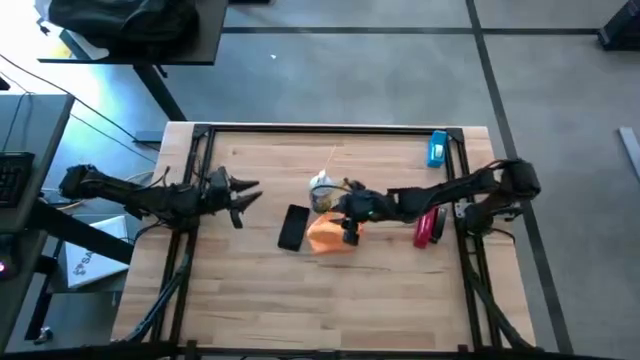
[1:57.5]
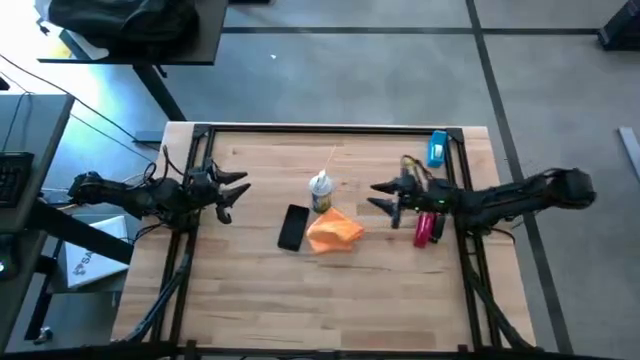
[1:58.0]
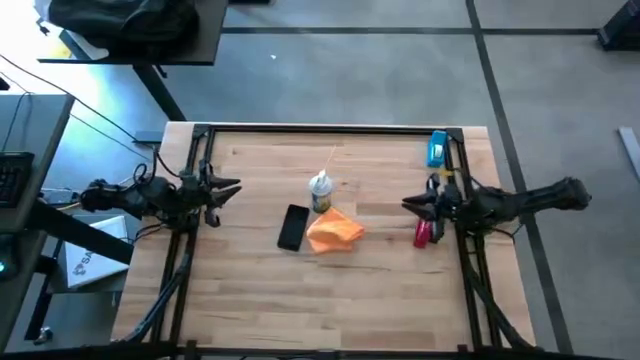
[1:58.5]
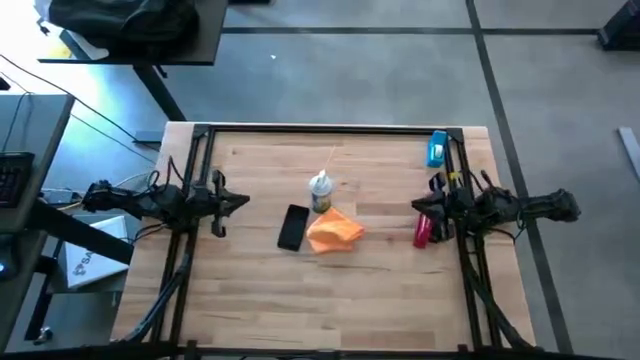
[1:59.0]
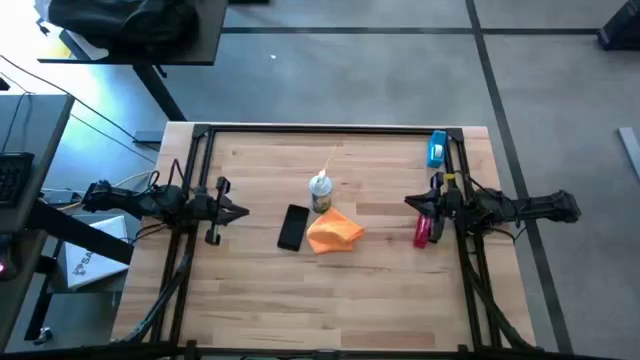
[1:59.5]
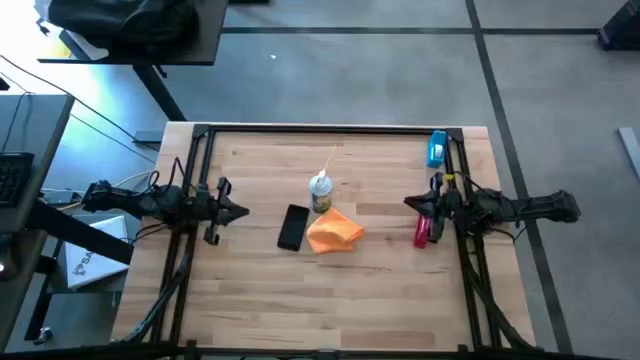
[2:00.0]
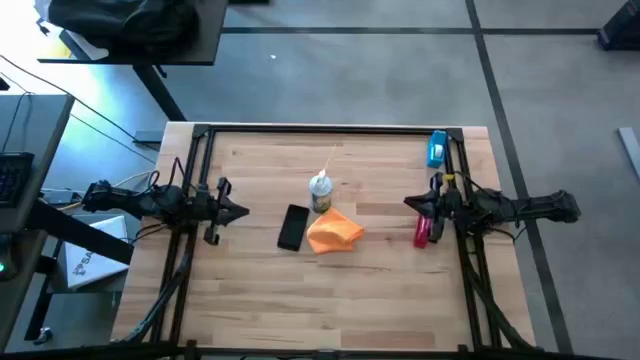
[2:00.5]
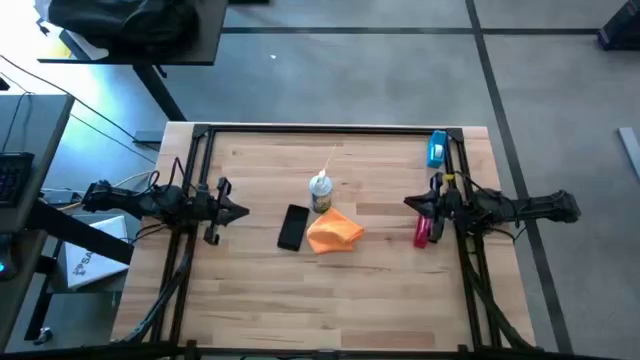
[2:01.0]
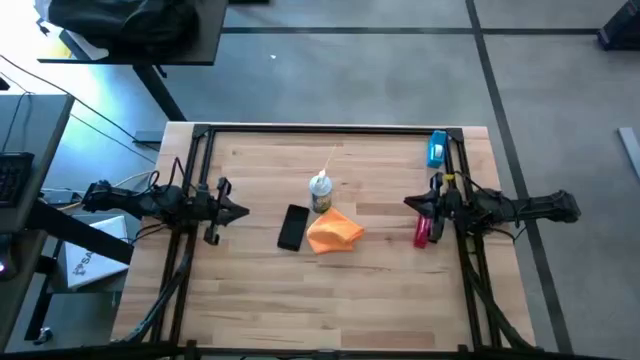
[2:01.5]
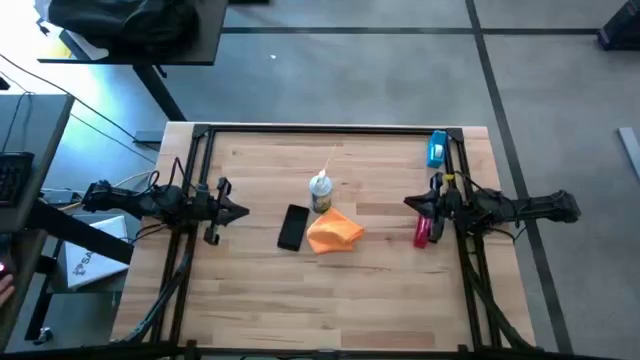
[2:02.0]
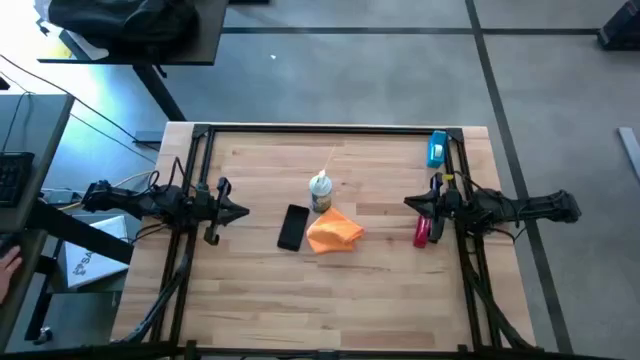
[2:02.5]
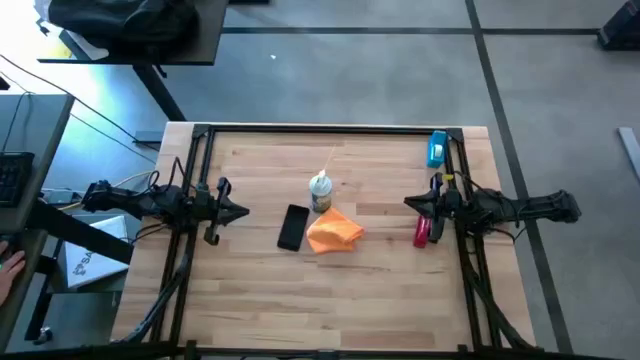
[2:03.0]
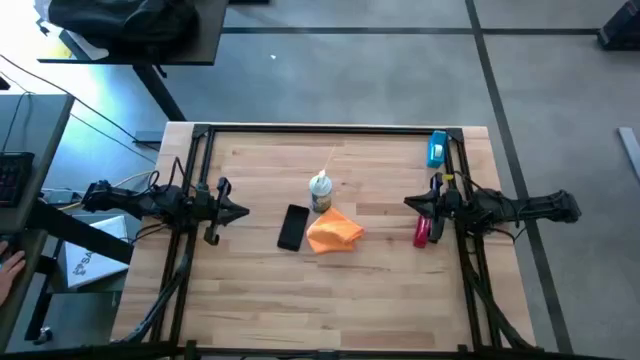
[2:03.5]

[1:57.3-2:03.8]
Task: Apply microfiber cloth
Return to Home Position

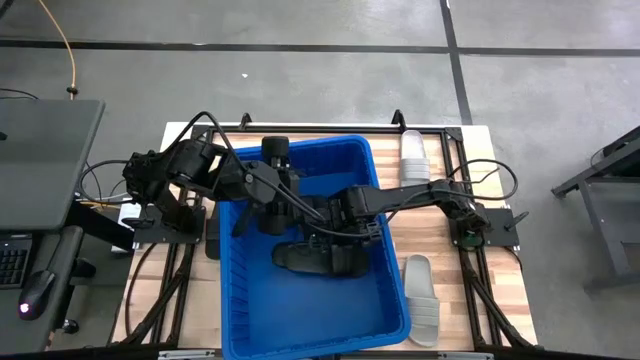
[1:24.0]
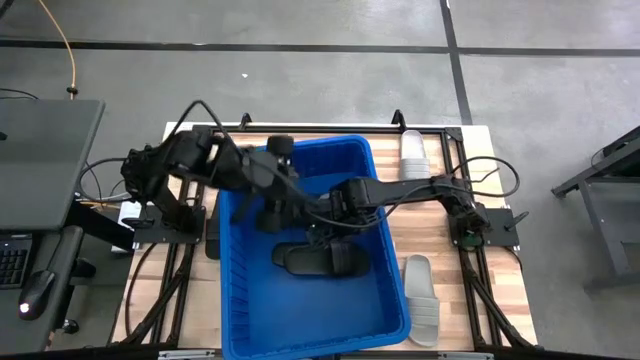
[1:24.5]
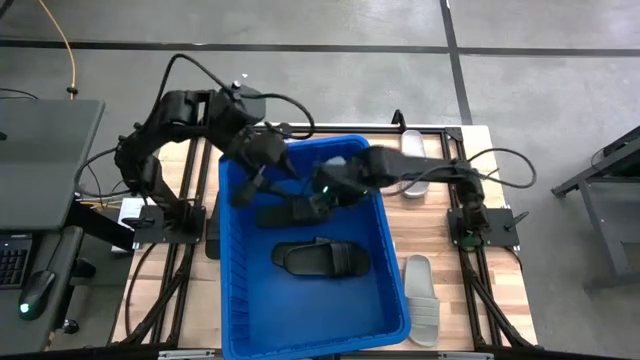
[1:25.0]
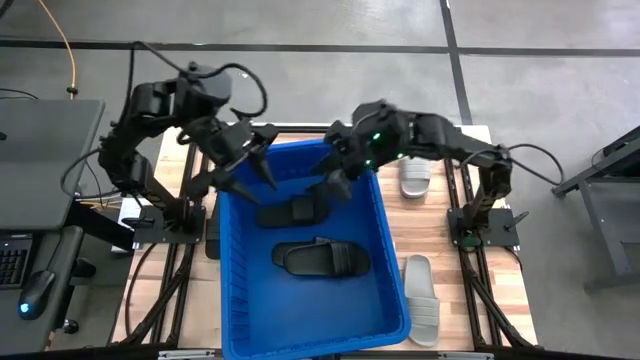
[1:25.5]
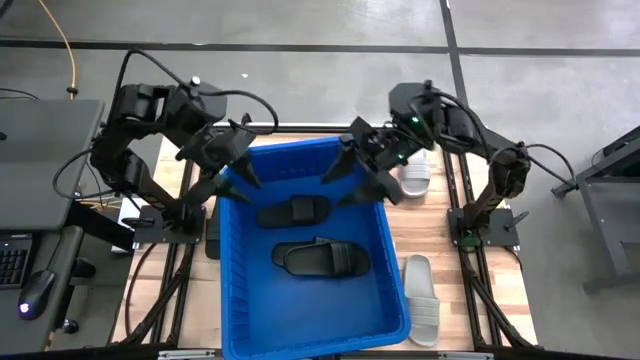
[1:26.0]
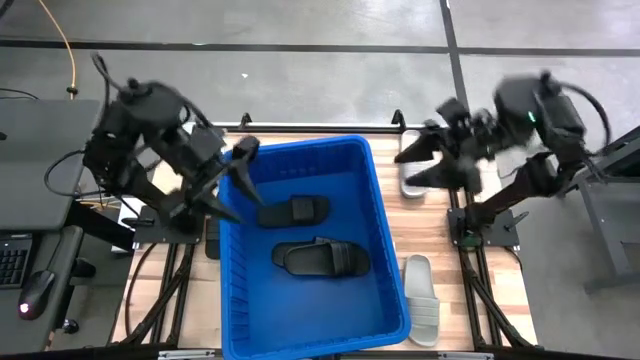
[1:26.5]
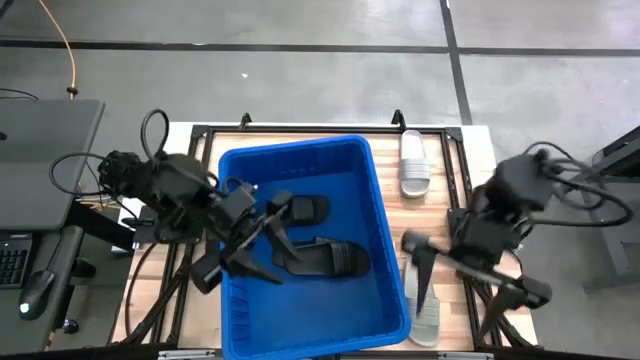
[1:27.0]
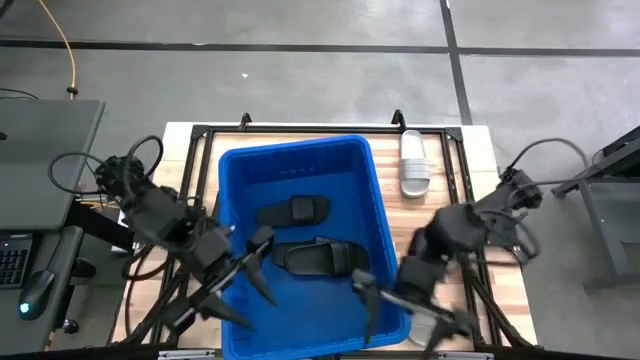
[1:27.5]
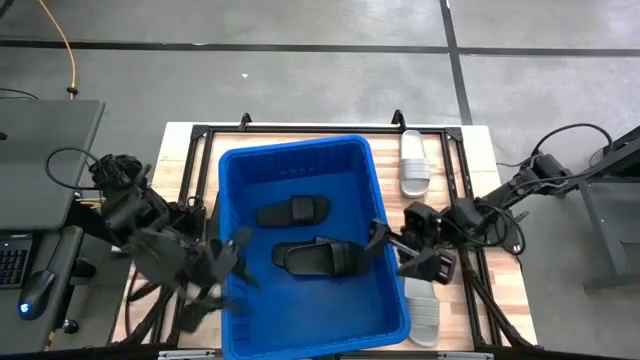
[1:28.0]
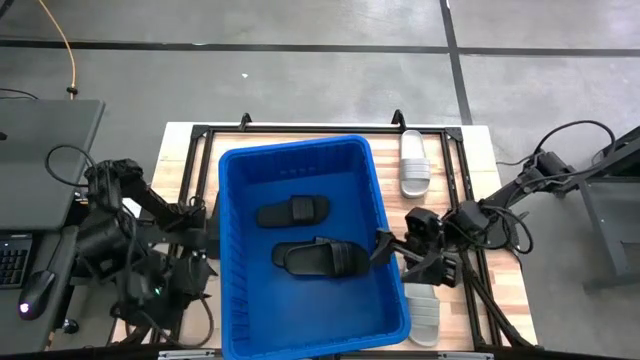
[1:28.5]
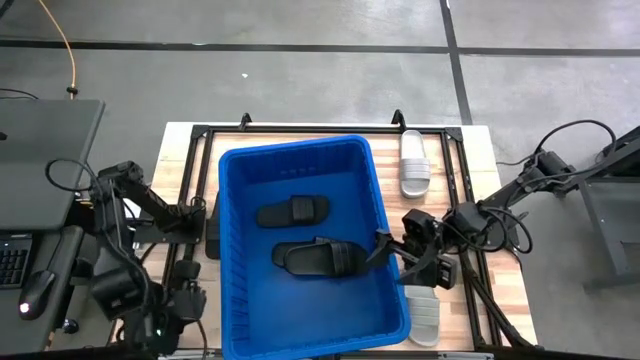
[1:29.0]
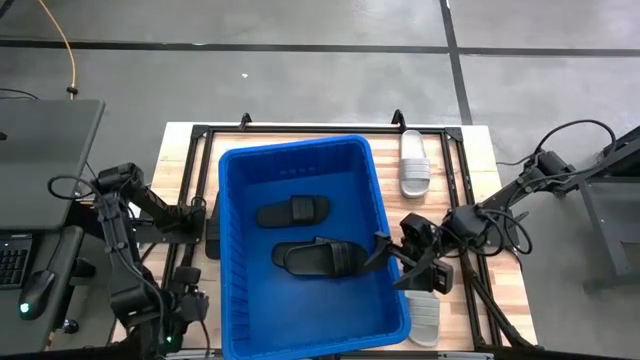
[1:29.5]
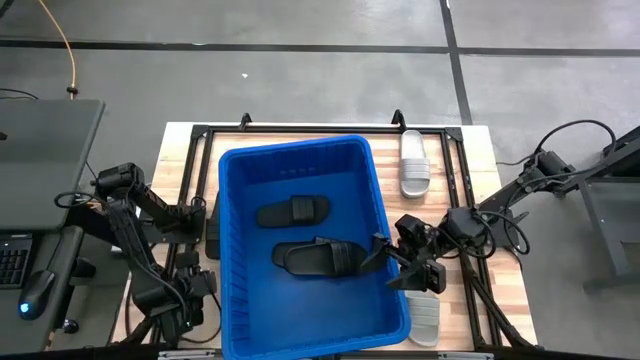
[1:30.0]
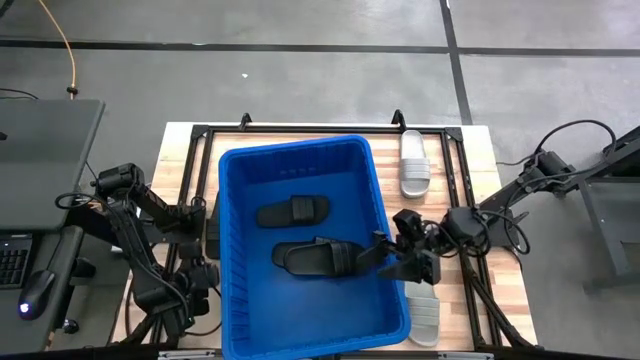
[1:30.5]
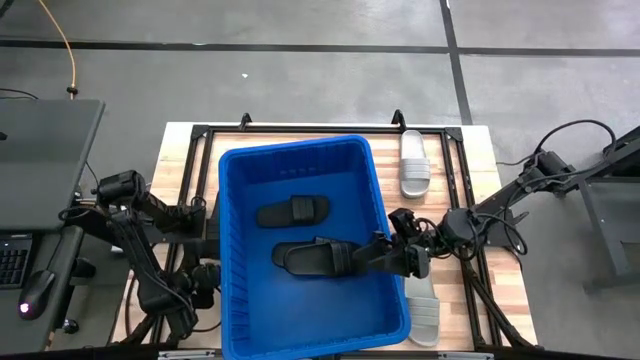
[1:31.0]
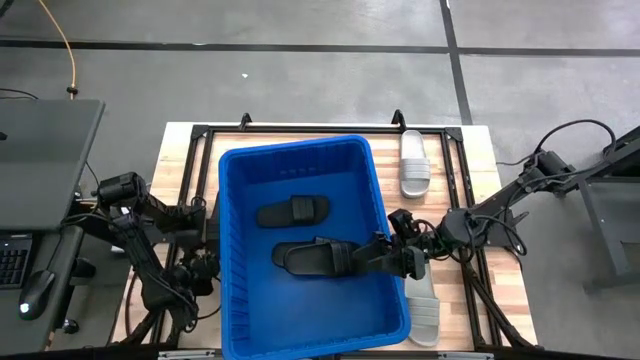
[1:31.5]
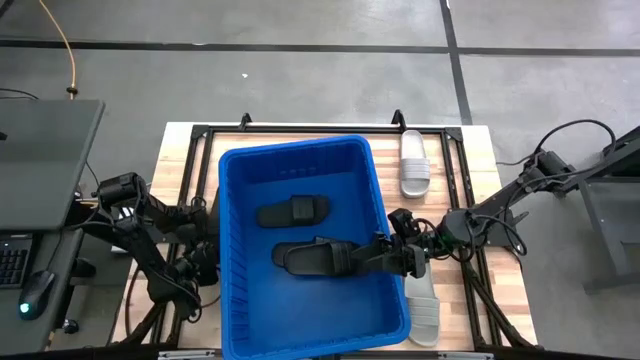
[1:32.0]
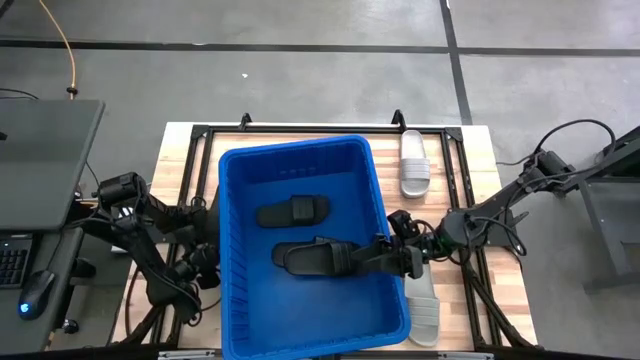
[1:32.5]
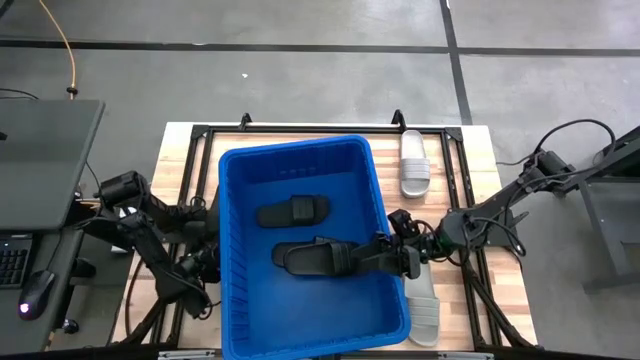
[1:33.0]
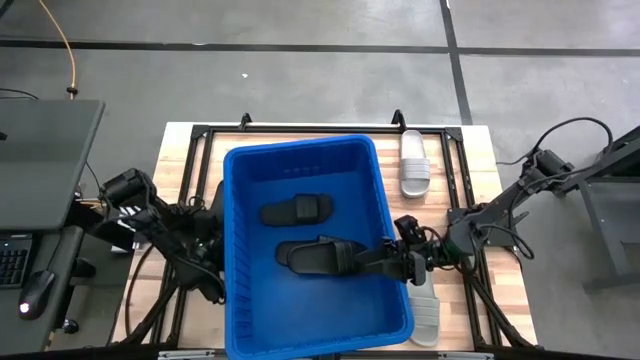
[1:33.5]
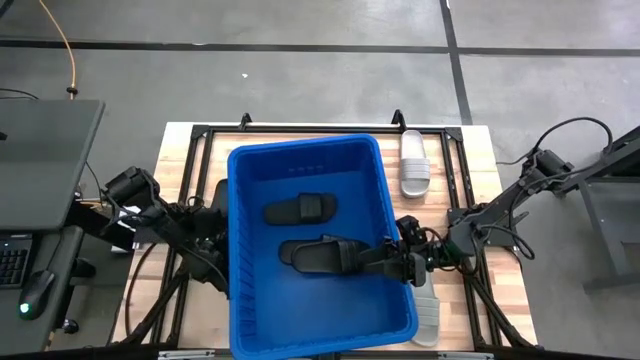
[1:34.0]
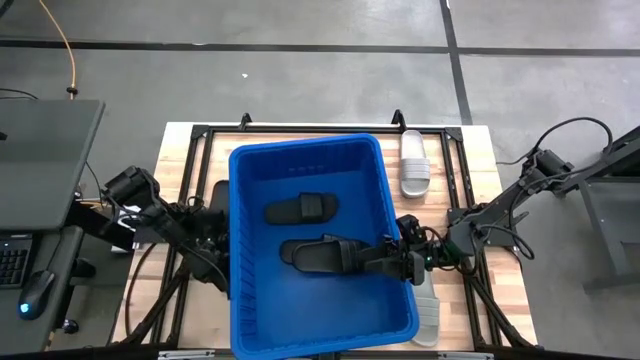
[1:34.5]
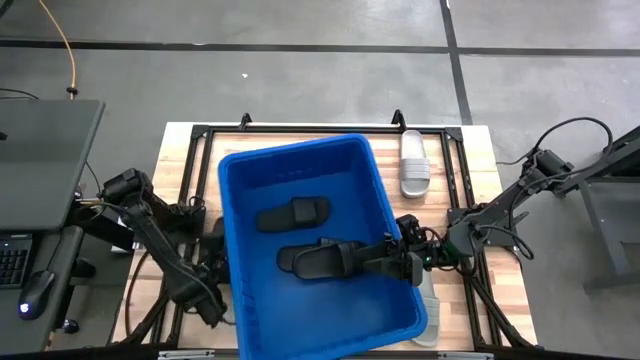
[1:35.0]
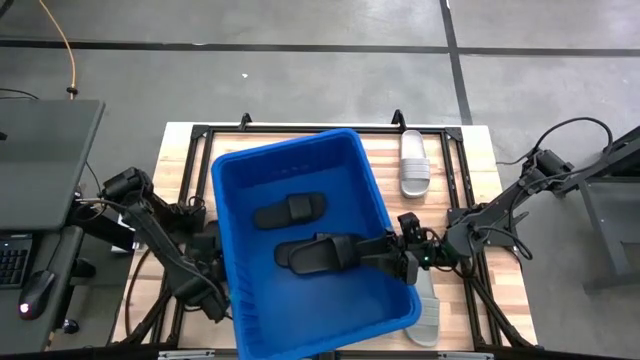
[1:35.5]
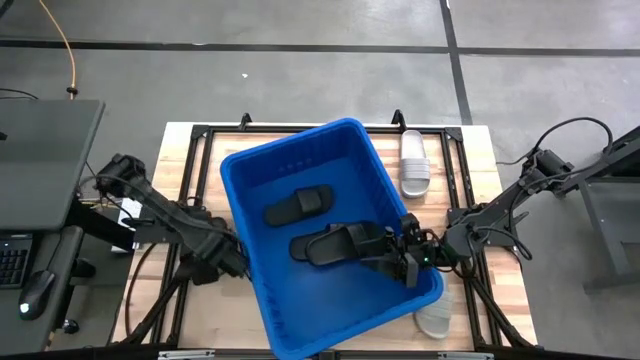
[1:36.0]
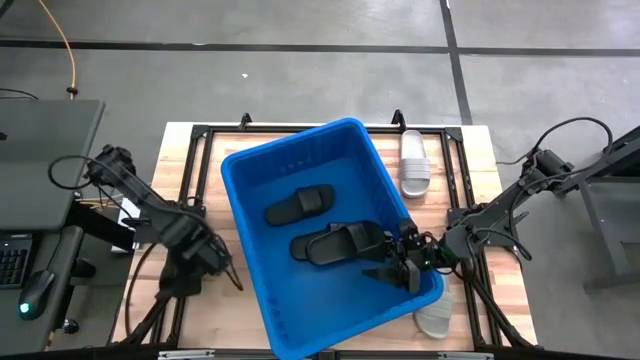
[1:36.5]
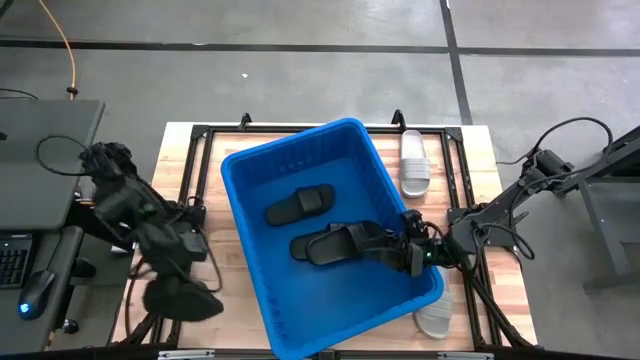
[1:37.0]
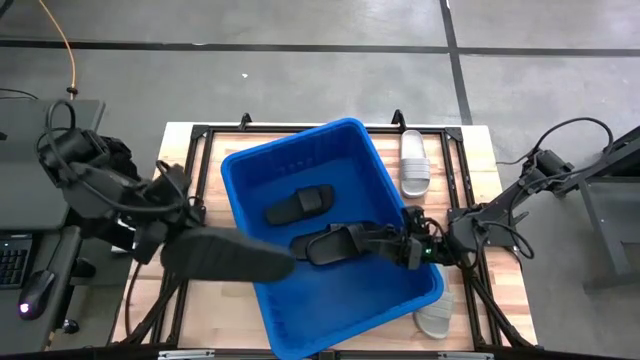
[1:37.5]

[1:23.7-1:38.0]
Task: Pick and place slides into bin
Put the black slide in the bin
